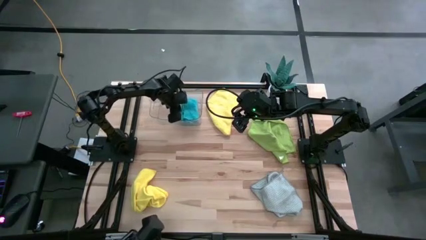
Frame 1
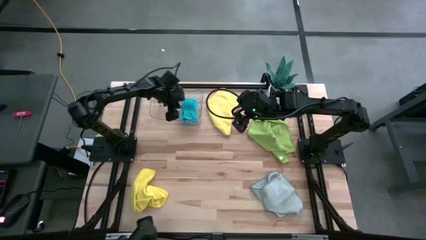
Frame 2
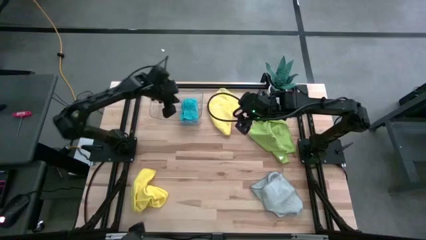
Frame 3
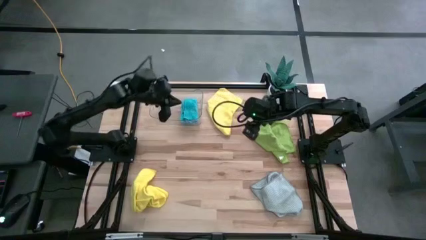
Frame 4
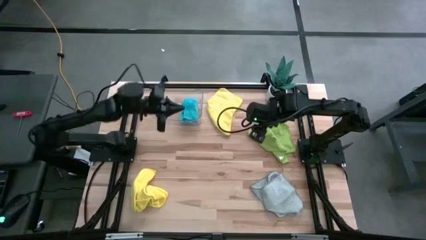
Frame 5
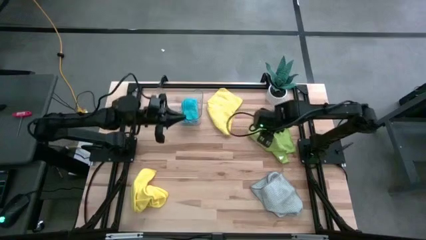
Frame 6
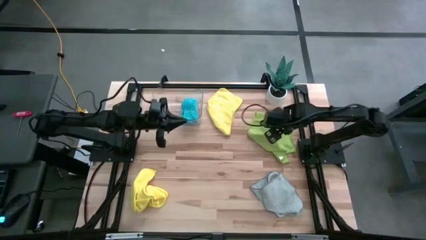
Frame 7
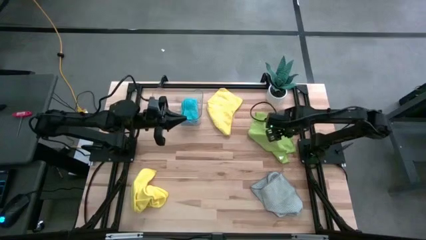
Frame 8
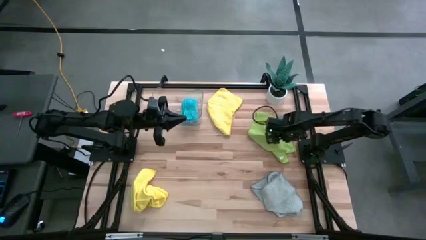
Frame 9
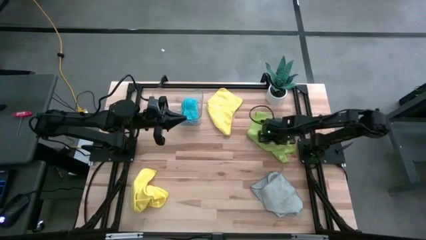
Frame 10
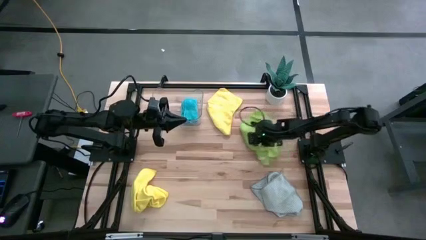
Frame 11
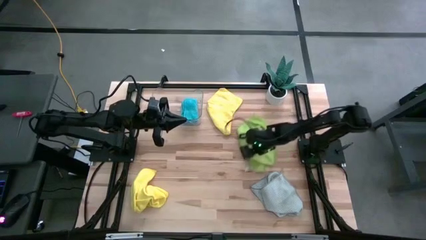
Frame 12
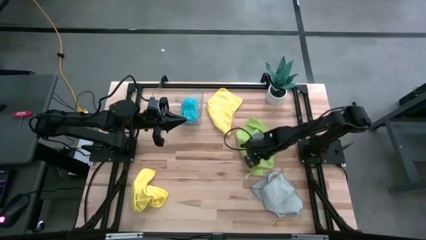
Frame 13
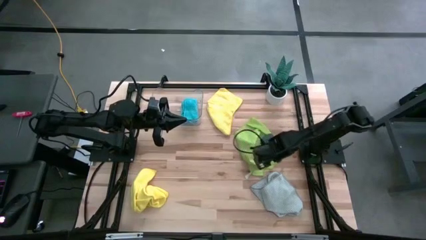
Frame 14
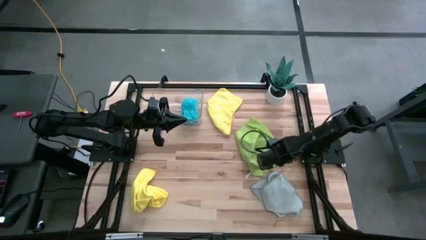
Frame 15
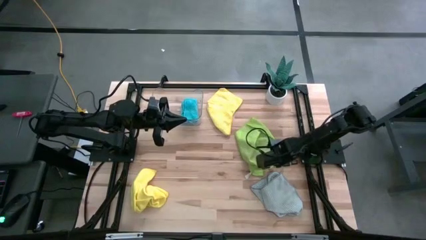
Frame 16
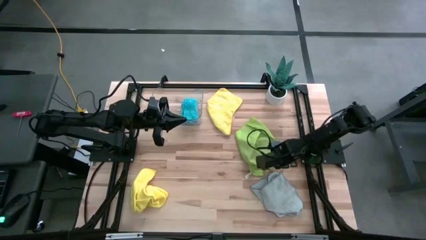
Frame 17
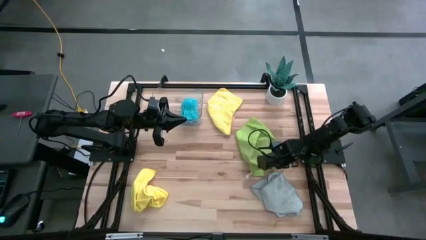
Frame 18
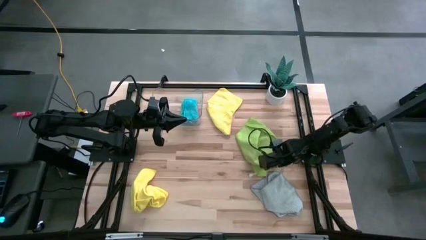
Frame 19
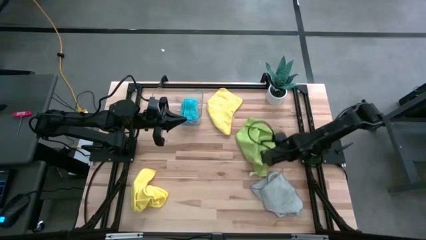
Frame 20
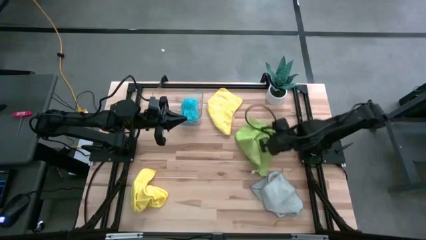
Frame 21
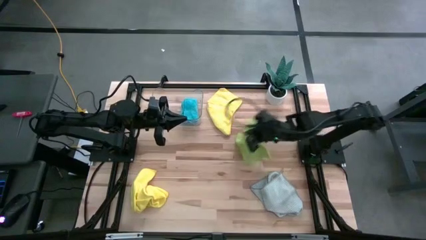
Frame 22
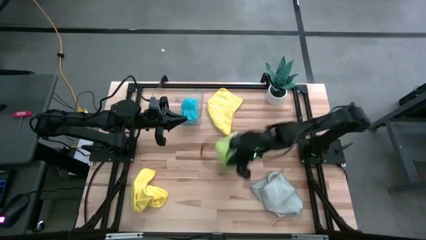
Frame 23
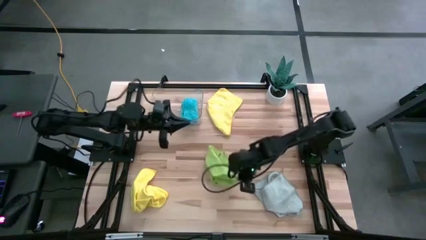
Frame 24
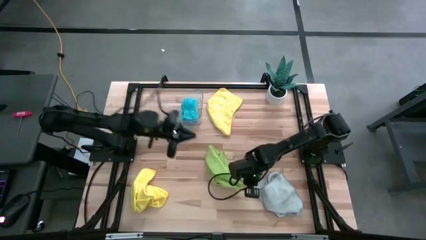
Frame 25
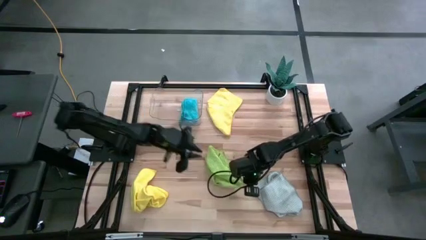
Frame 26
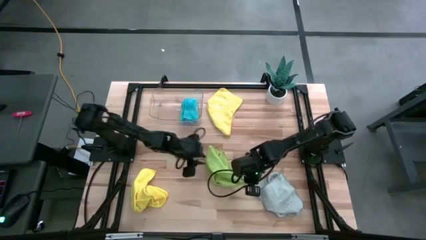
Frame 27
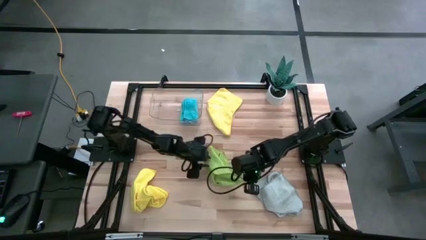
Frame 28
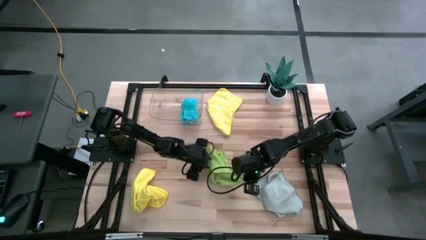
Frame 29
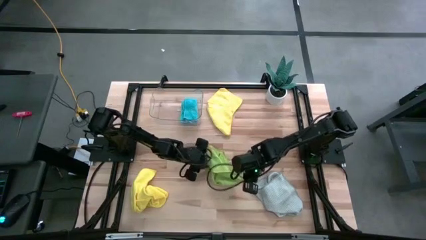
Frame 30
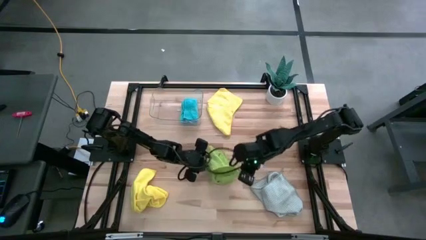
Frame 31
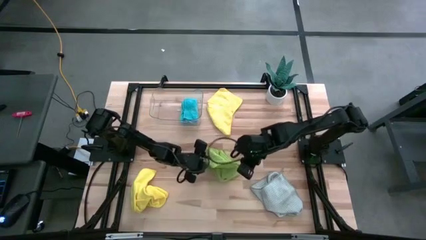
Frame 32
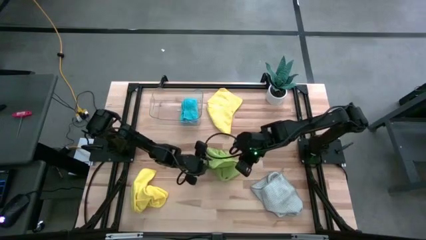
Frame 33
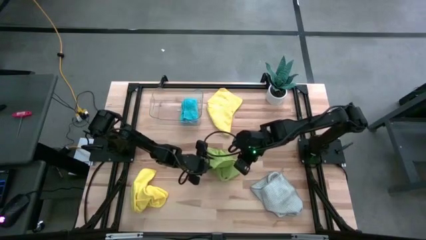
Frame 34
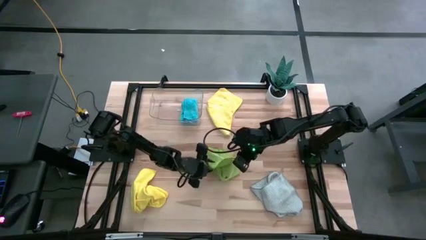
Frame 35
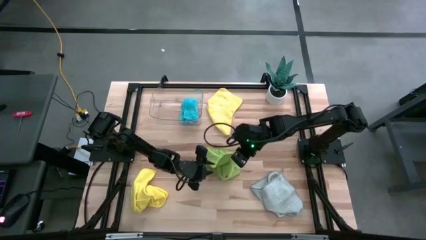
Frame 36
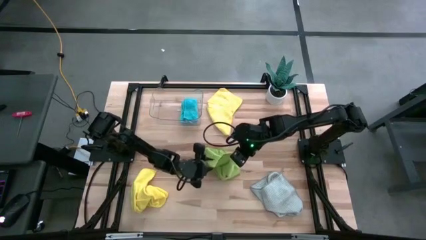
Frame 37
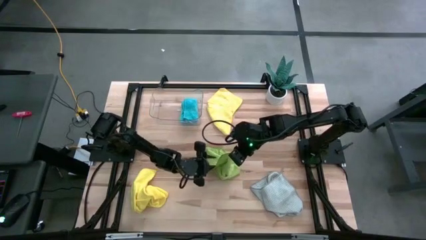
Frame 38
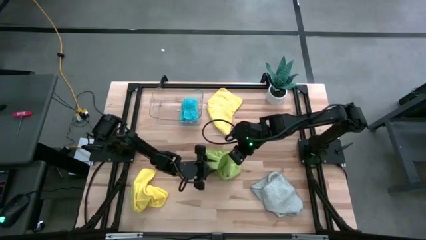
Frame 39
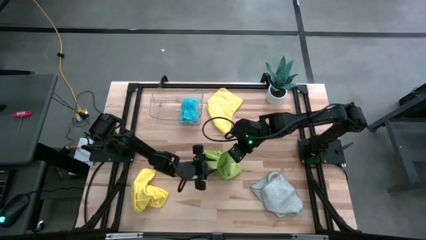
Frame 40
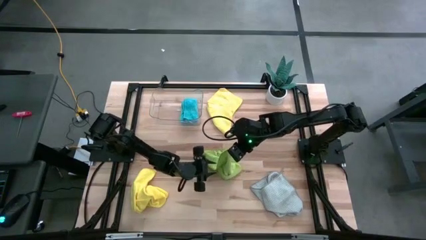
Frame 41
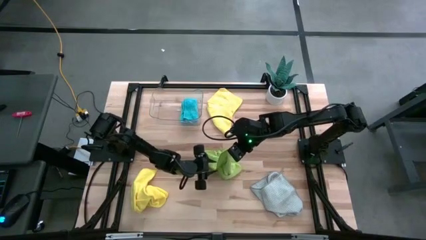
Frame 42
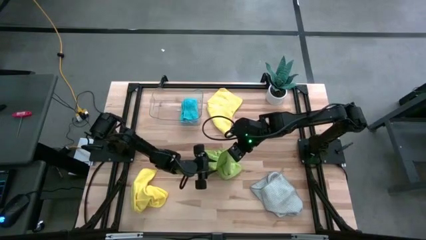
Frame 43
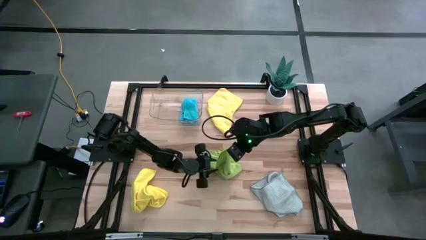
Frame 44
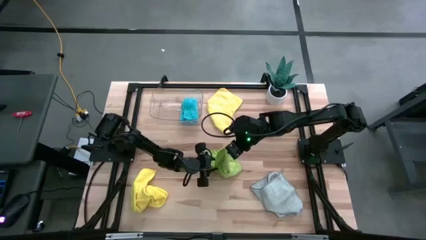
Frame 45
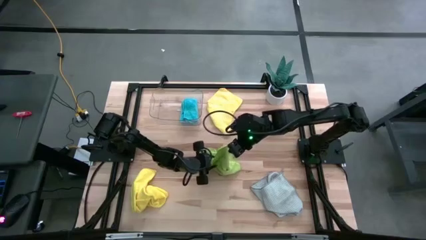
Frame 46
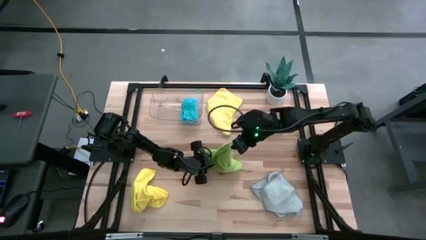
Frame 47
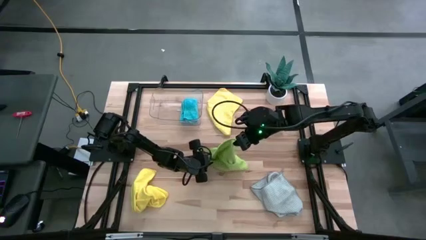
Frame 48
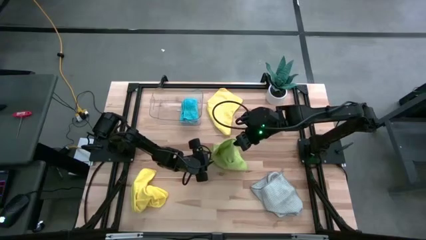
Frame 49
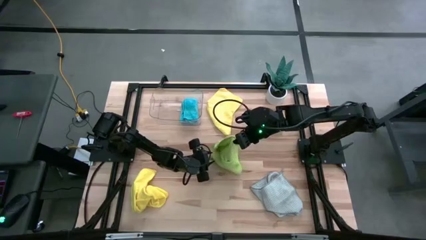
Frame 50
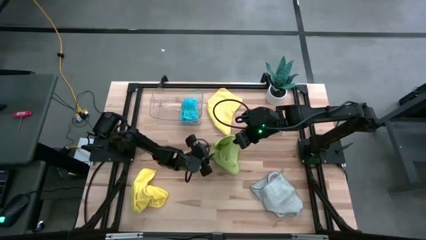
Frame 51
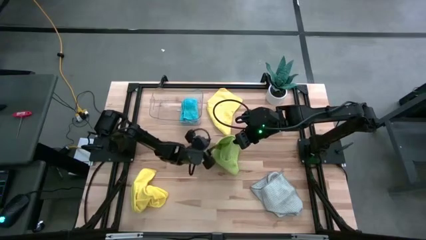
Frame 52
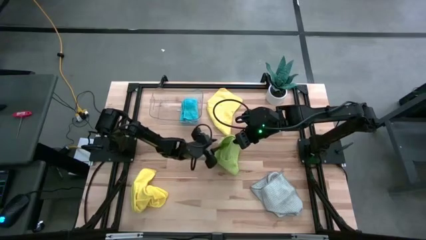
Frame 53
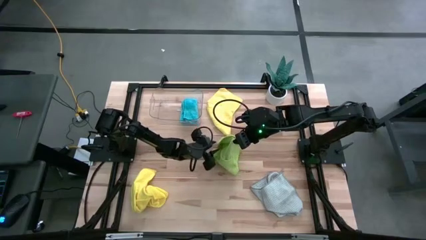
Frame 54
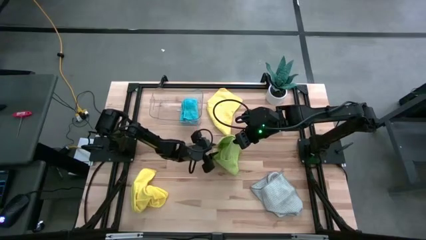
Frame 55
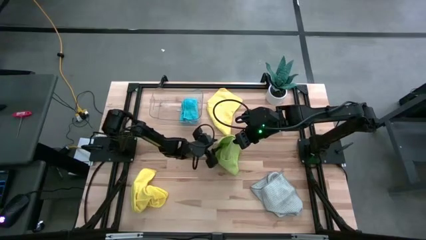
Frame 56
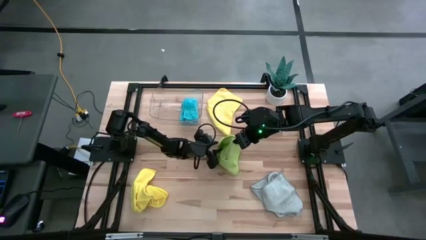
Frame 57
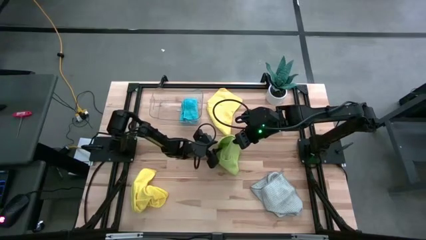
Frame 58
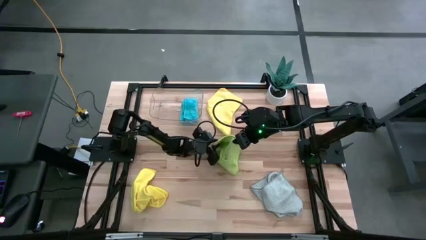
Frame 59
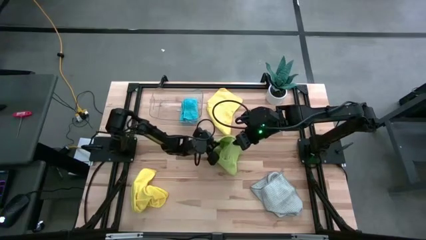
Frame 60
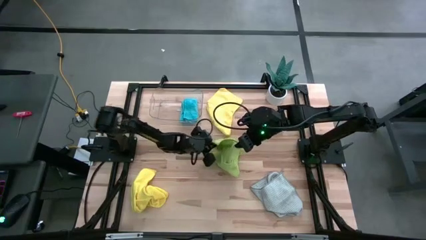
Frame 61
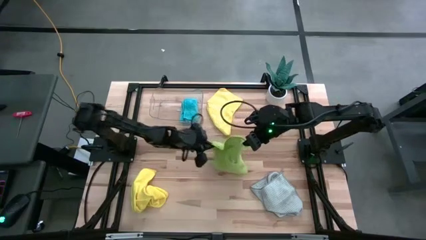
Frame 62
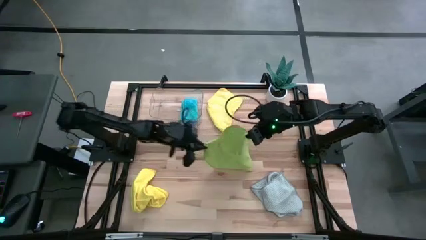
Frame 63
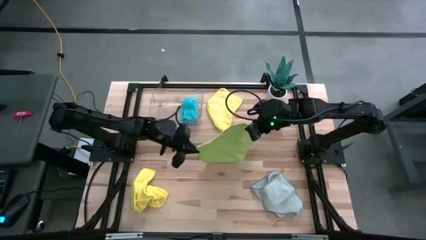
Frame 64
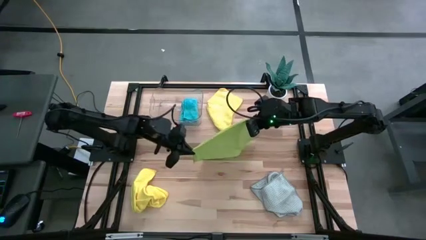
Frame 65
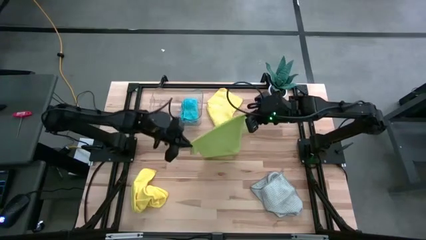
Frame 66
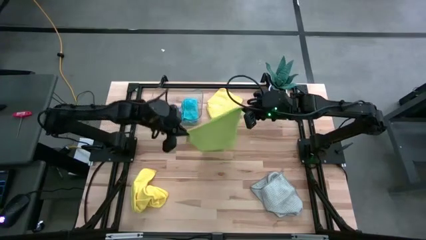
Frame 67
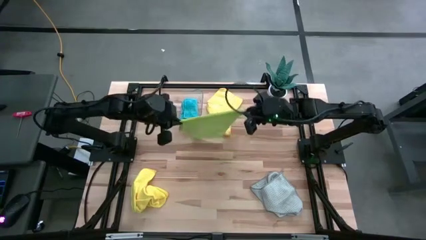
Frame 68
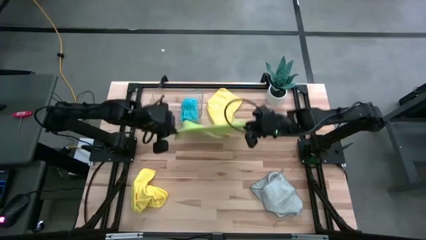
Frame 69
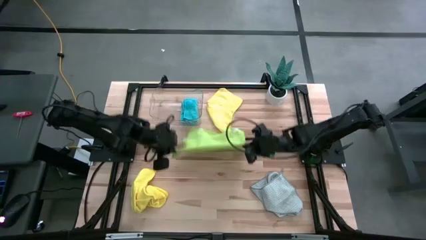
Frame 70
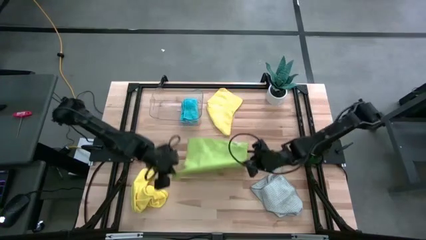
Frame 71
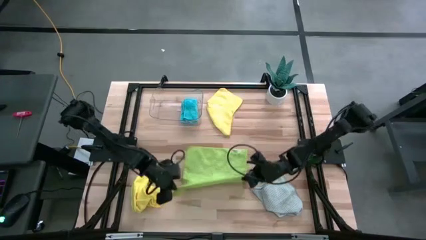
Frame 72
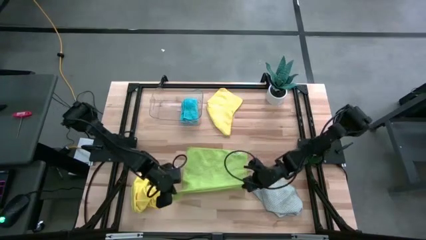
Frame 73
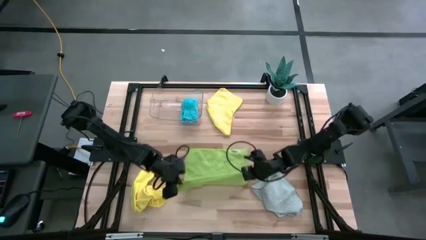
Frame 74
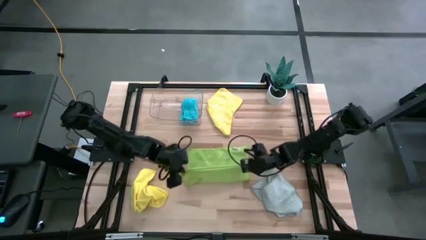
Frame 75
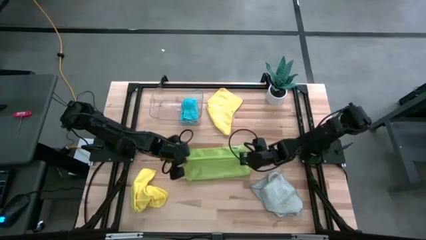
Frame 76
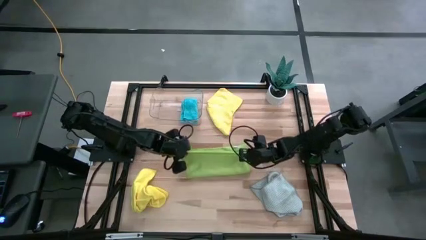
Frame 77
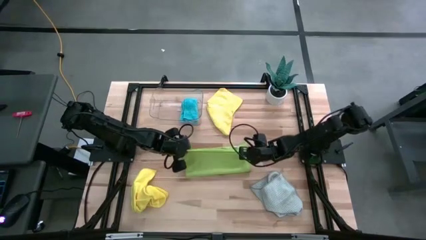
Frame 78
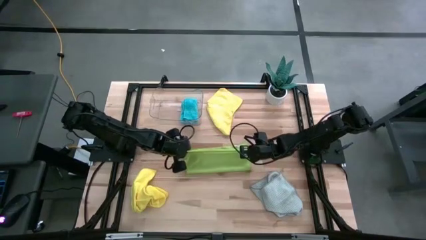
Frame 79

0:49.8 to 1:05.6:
Task: Fold microfiber towels
Fold the green towel
